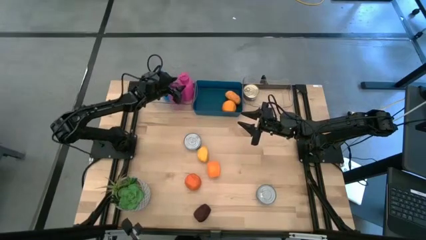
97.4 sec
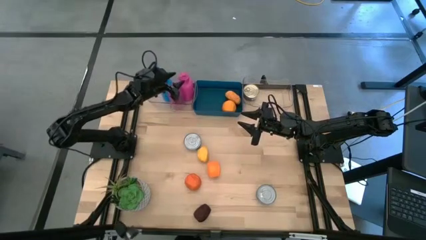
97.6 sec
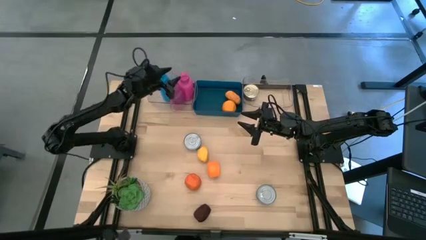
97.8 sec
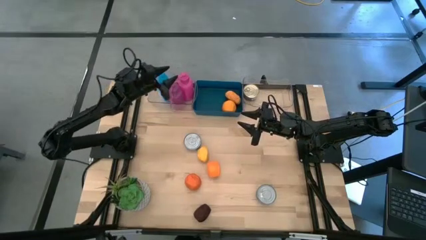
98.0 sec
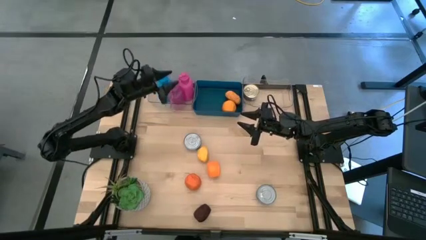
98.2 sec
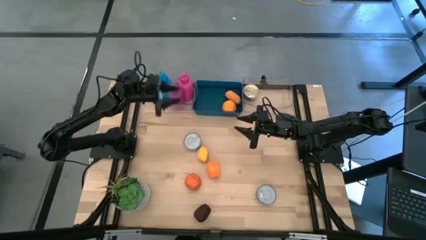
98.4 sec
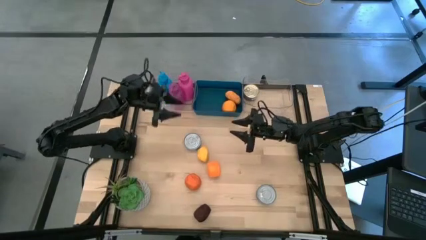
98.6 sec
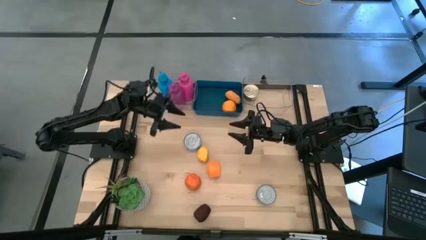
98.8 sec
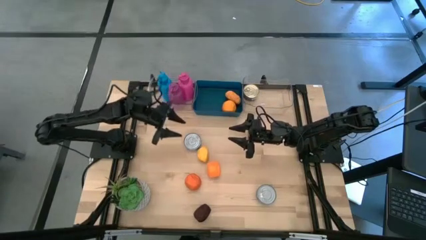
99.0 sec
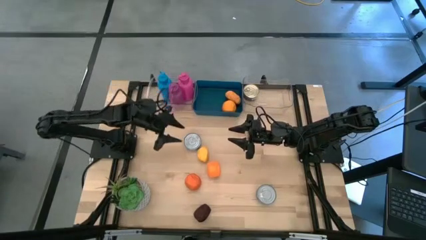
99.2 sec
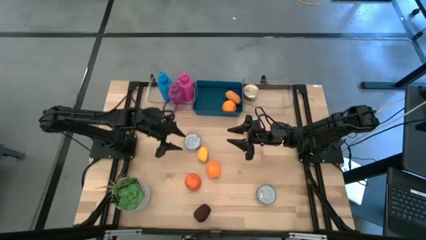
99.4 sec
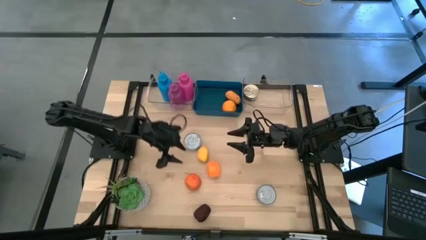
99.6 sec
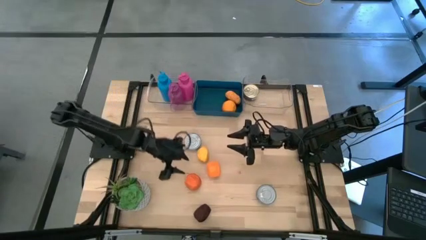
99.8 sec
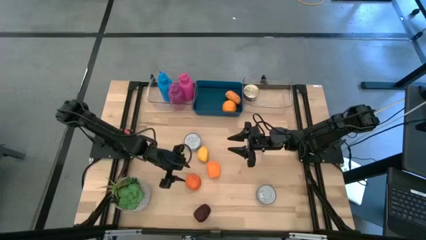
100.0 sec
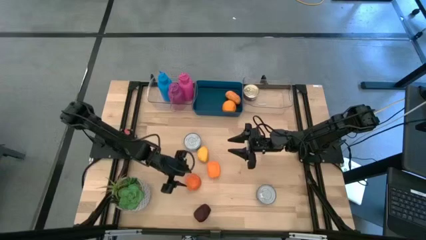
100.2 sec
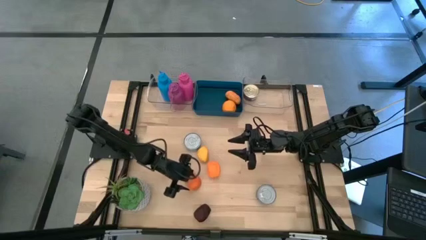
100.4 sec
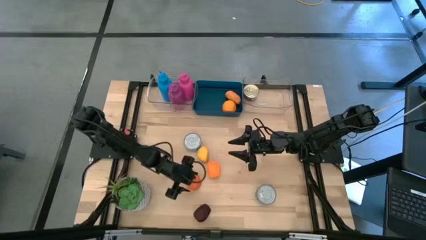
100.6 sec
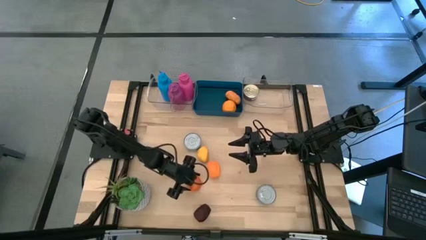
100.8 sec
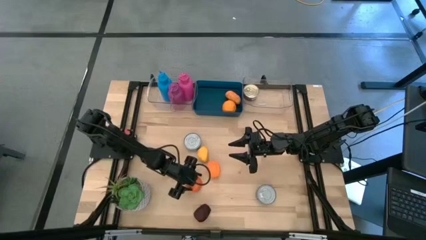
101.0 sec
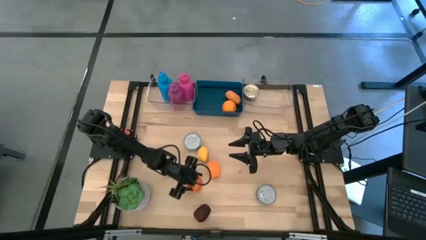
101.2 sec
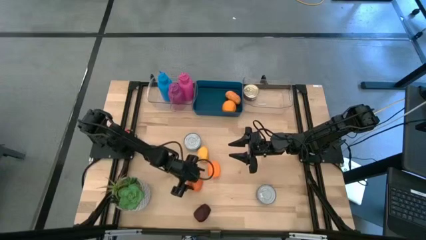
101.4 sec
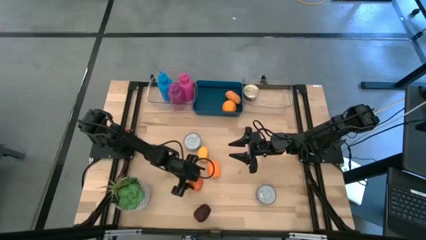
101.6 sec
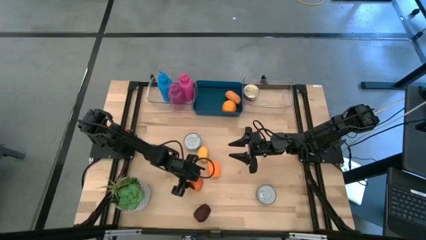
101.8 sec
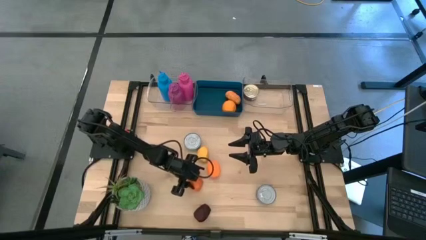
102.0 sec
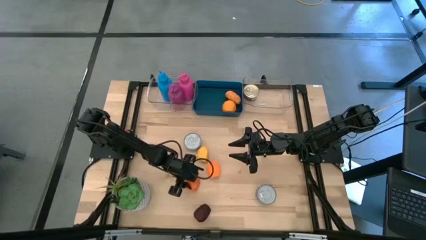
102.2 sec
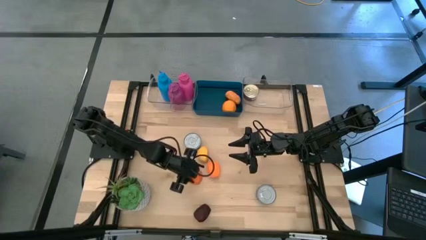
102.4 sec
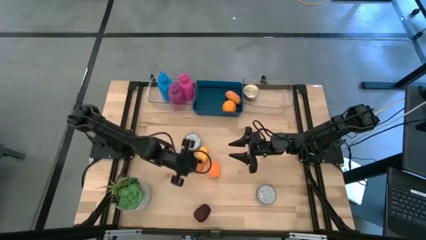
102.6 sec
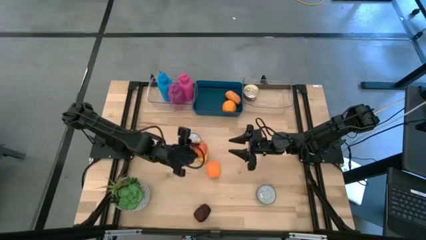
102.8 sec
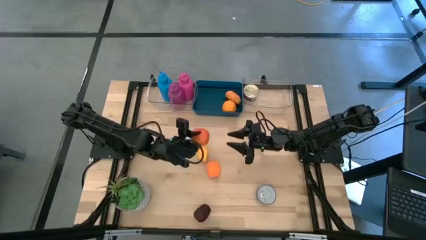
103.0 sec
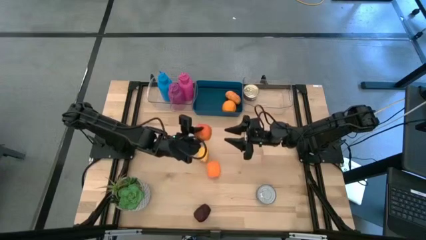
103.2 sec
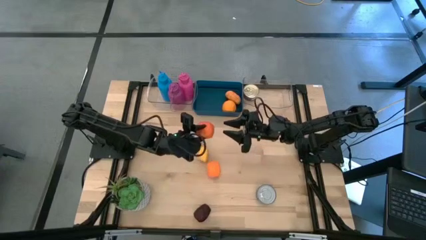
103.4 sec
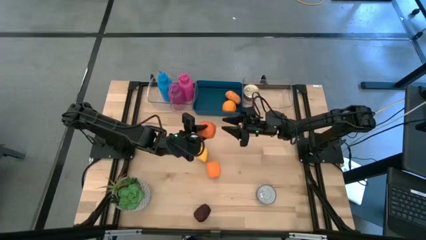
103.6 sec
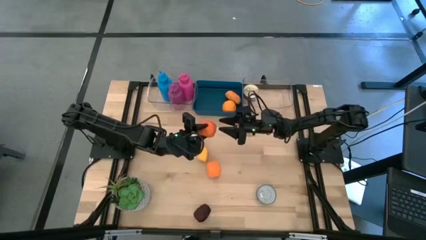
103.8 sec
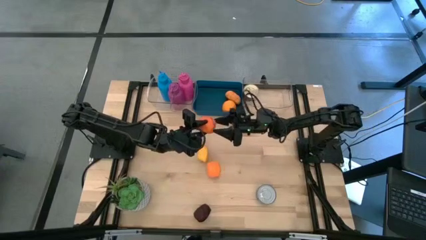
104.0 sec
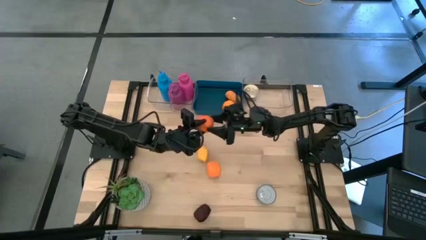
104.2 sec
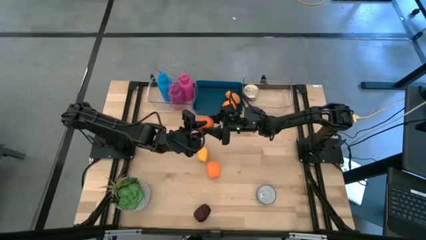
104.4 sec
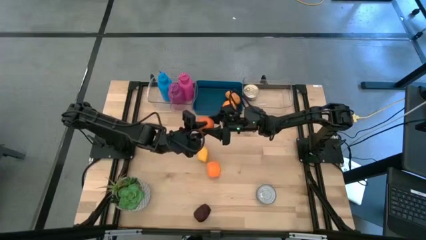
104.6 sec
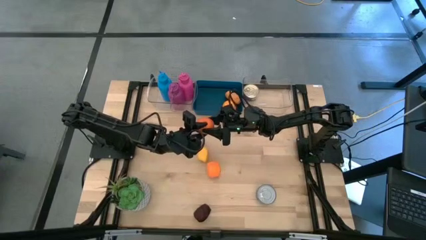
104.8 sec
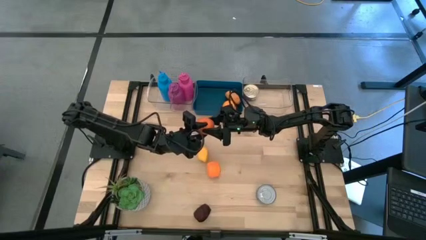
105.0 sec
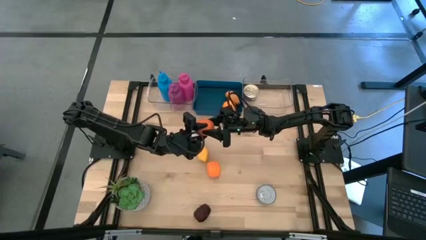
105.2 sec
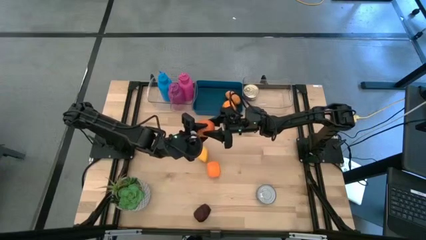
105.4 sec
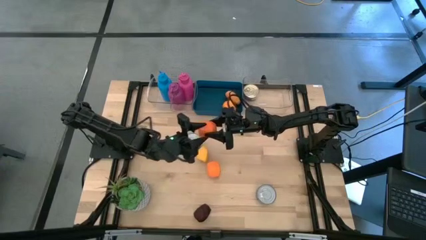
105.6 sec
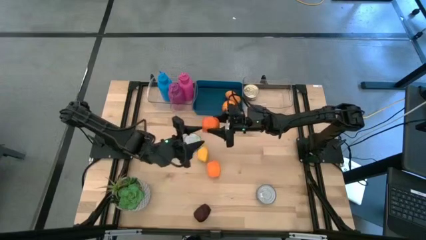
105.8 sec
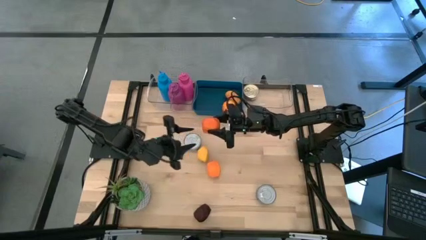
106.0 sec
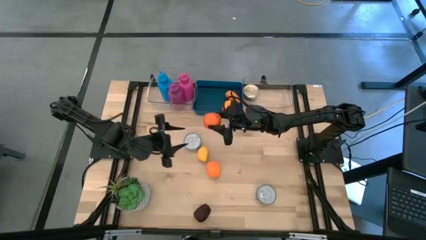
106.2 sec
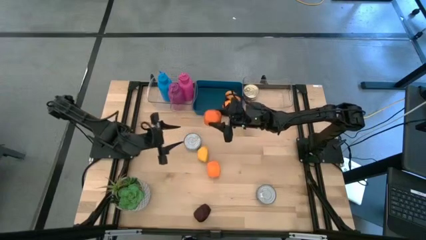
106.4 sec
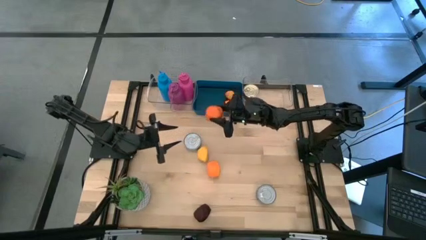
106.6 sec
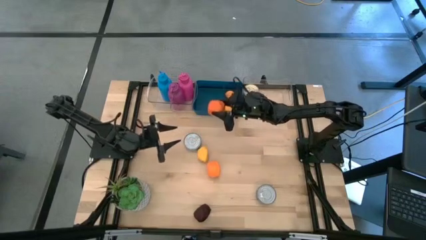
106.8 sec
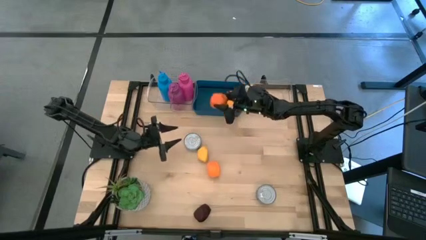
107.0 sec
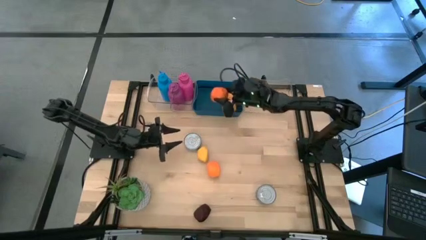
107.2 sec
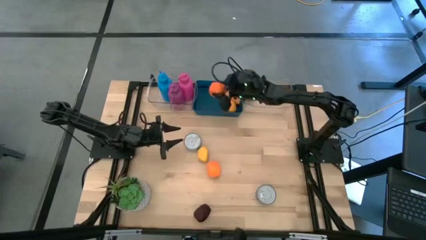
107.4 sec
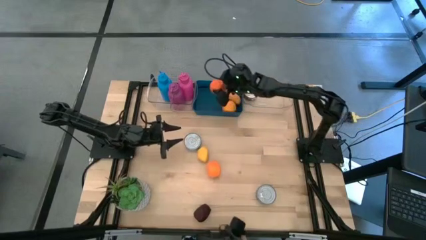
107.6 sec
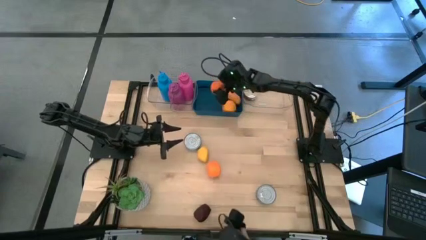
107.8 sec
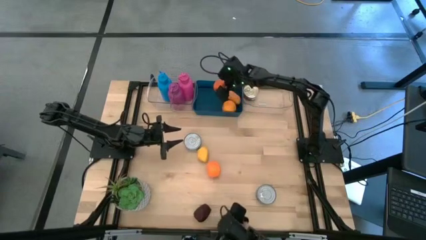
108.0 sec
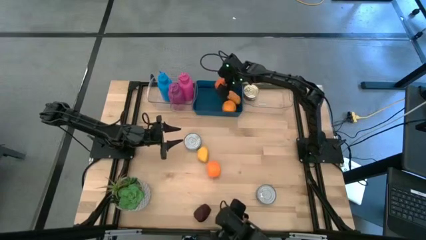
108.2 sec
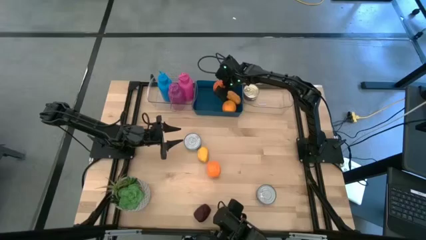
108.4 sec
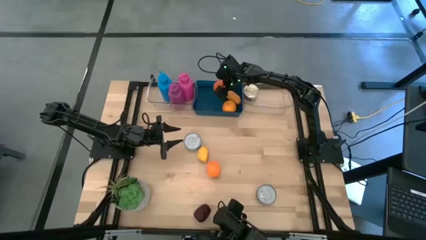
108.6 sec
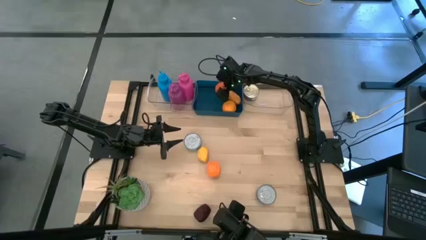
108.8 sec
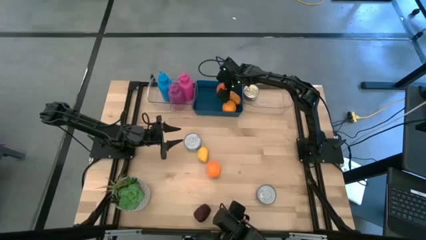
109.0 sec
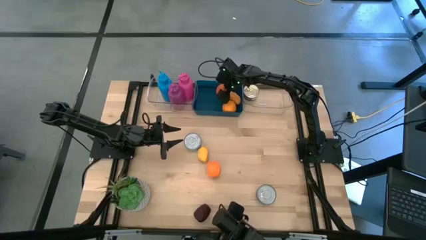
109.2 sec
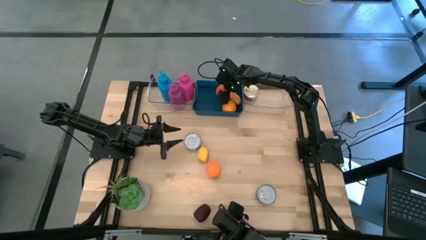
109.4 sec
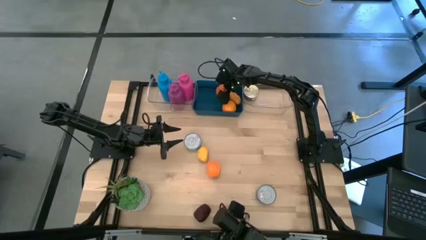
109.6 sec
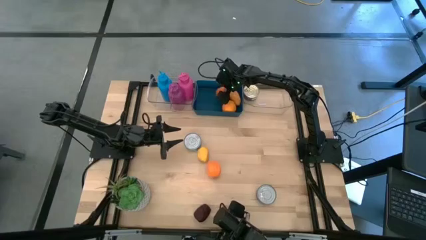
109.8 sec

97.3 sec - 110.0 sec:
Task: Pick & Place Food Item
Put the left orange into the blue bin
